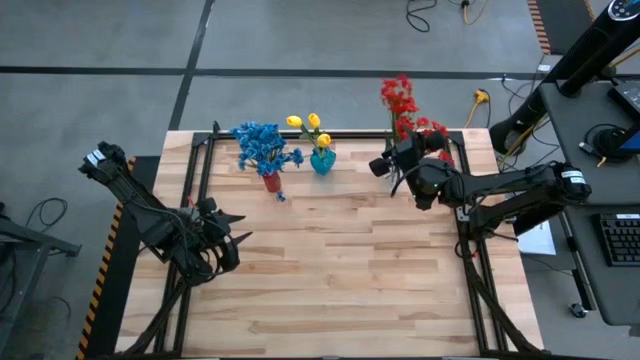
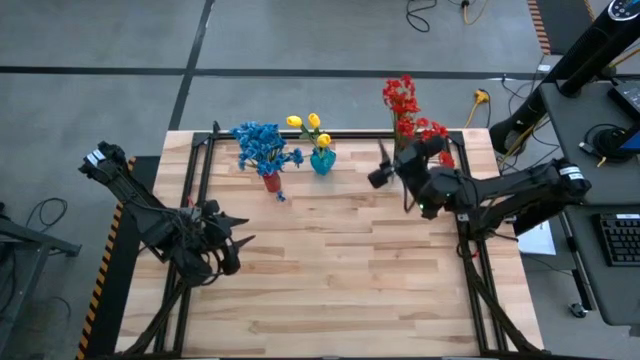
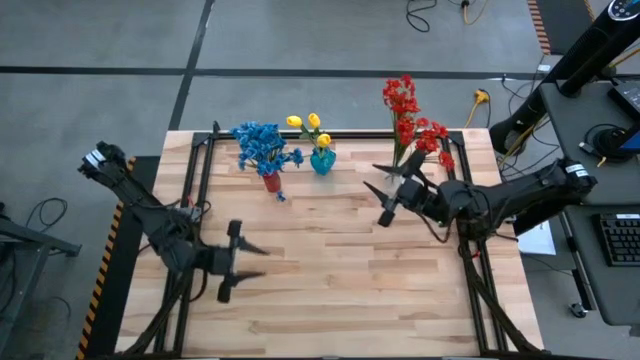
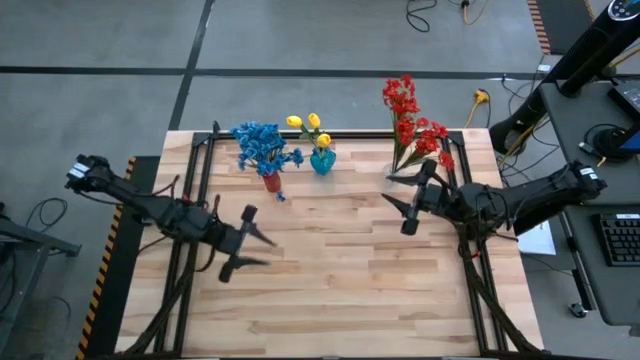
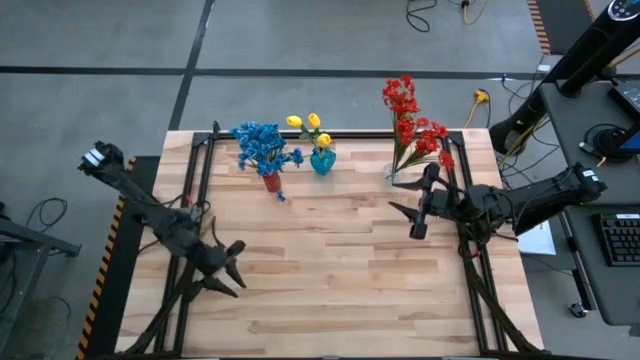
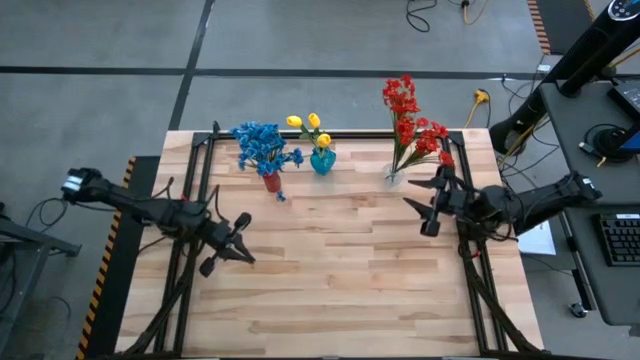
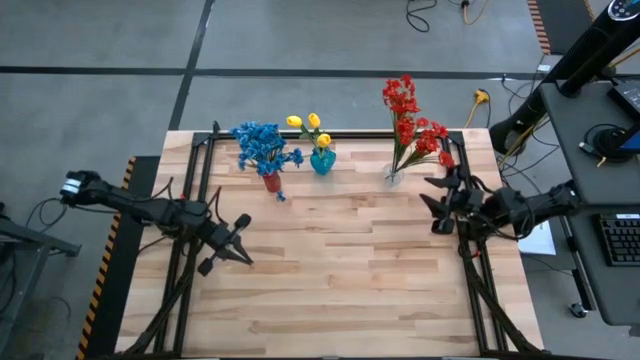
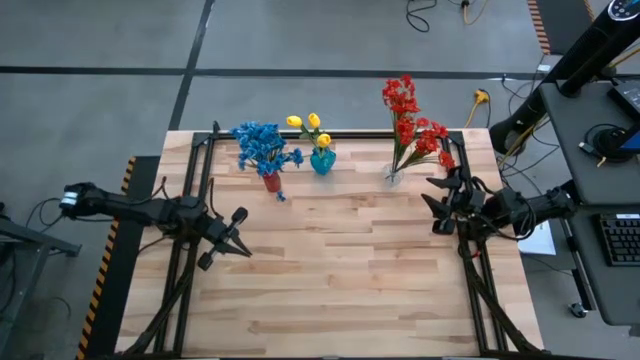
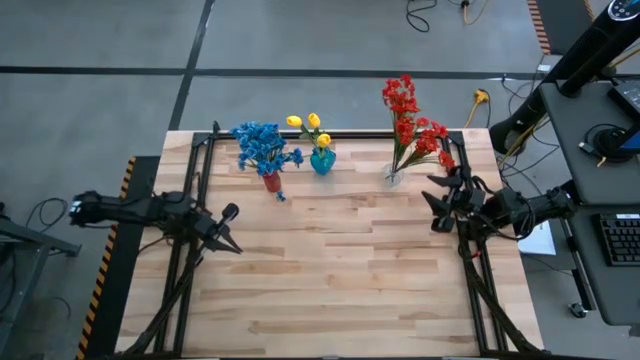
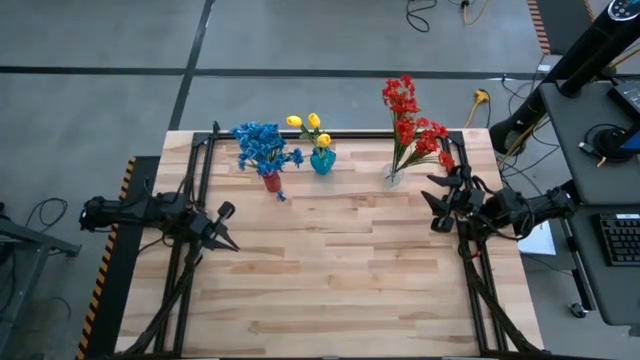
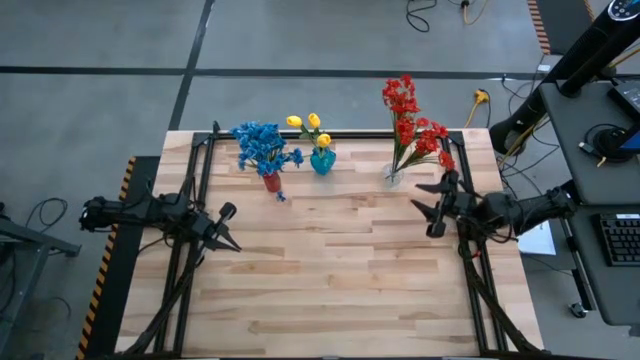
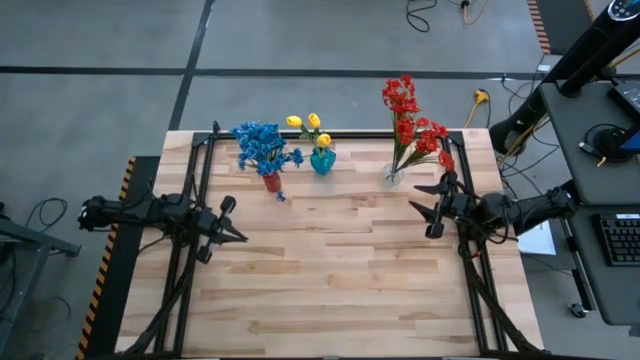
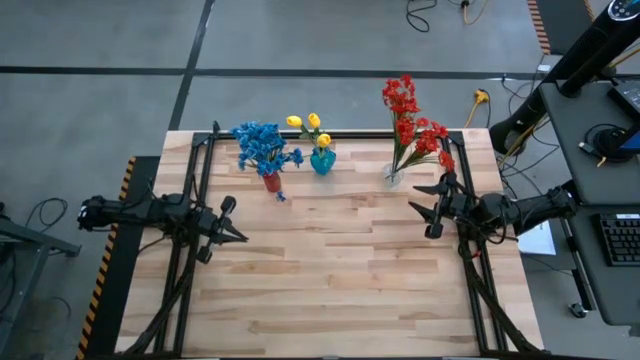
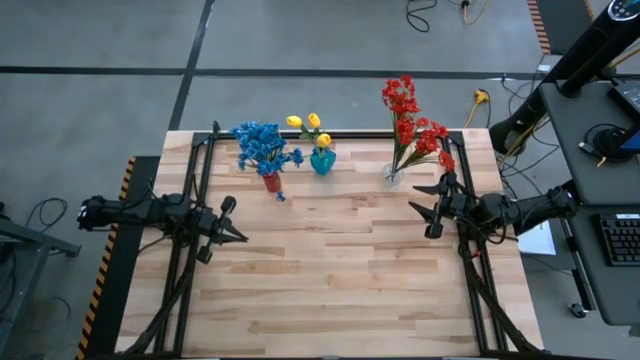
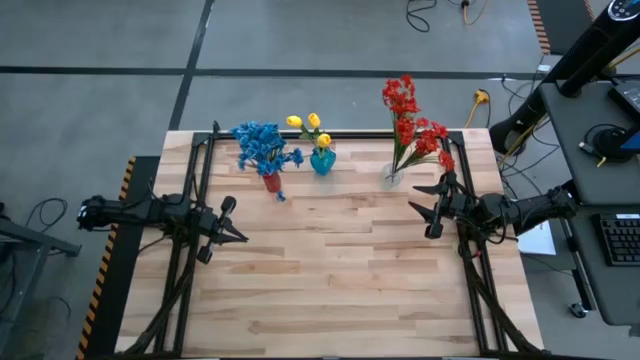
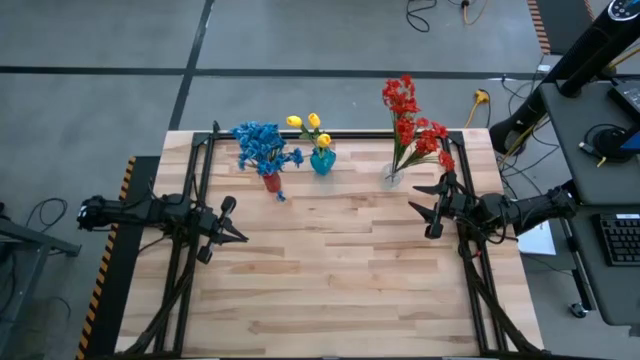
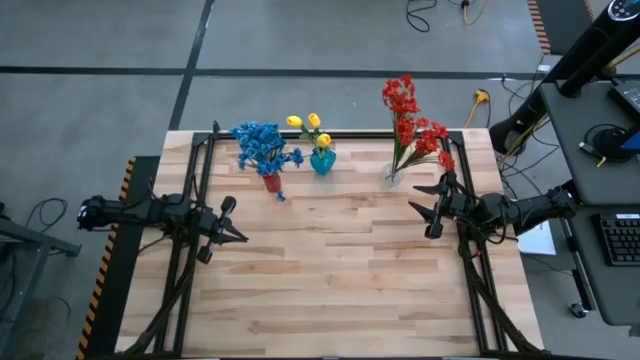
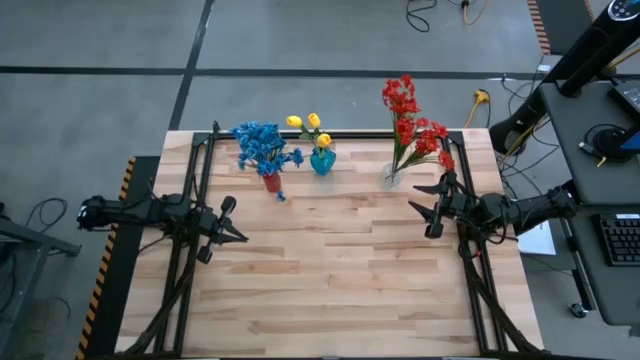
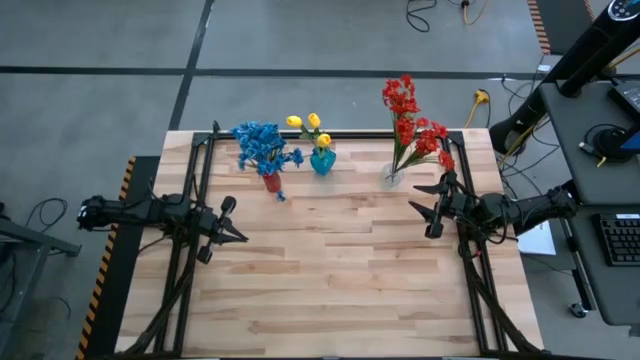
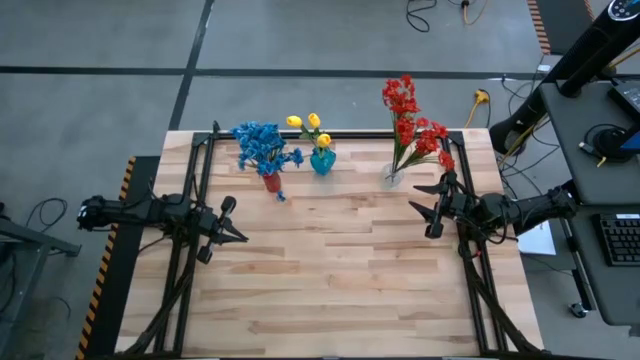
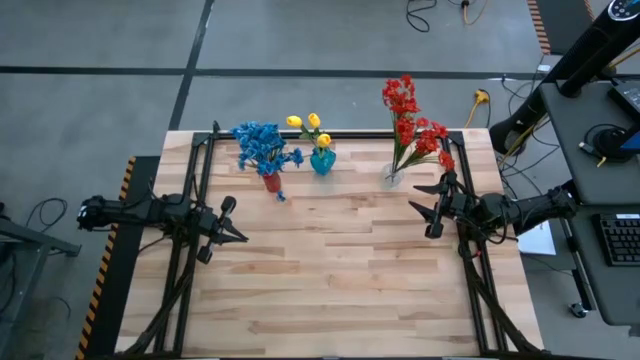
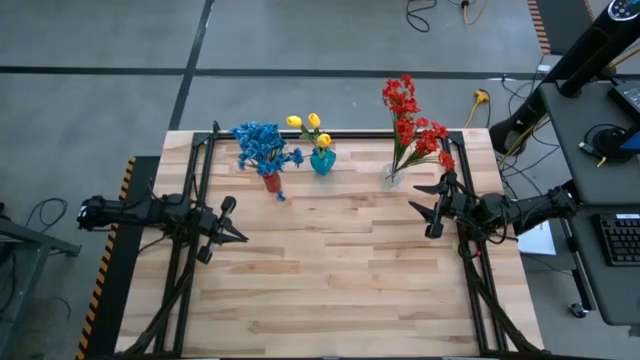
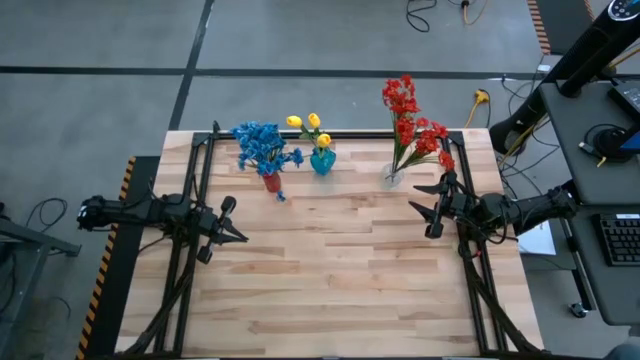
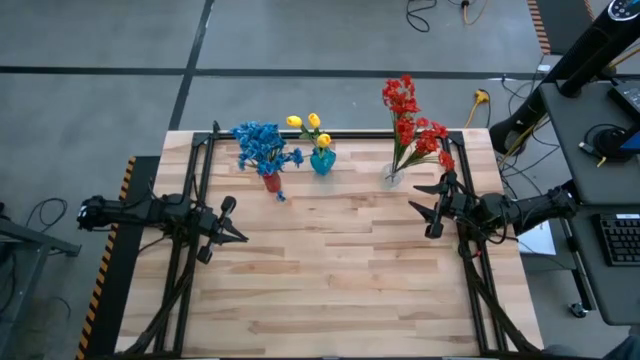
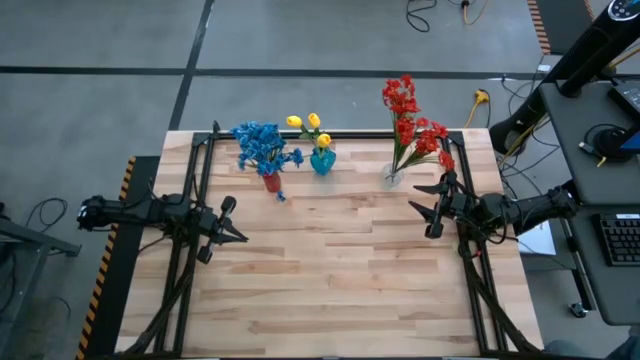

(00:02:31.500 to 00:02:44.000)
Task: Sort flowers into vase by color
Return to Home Position

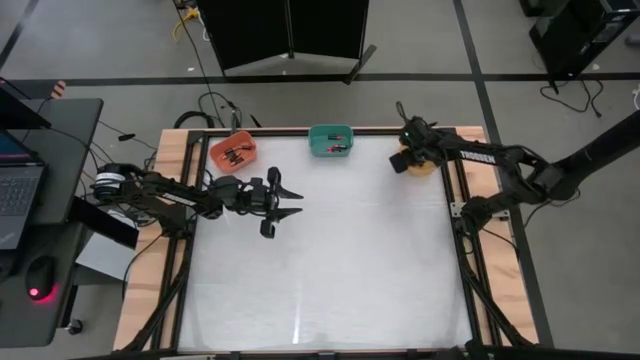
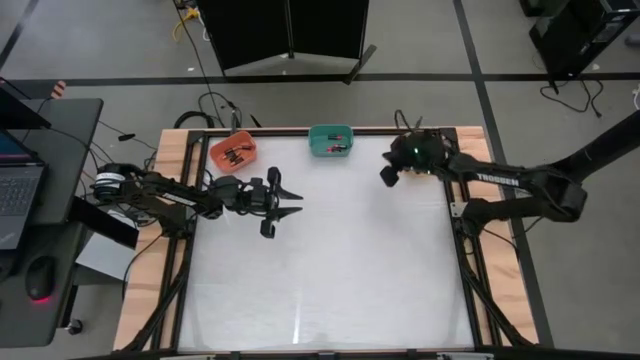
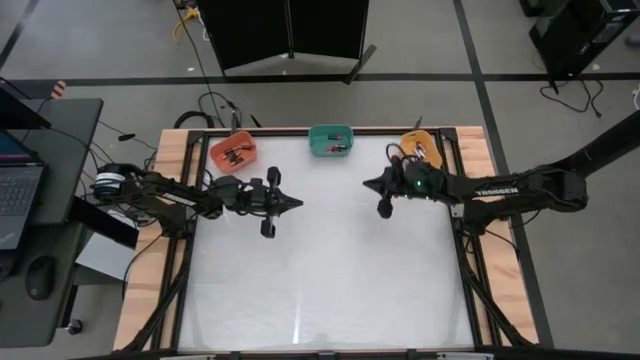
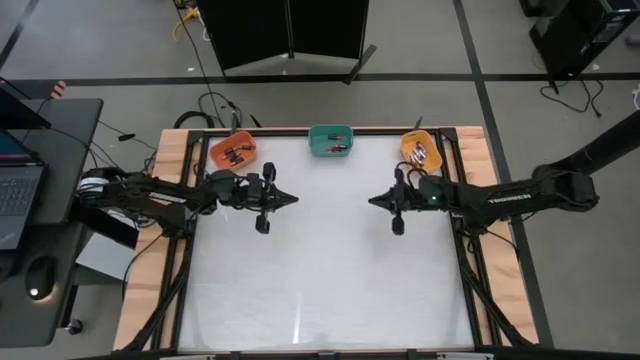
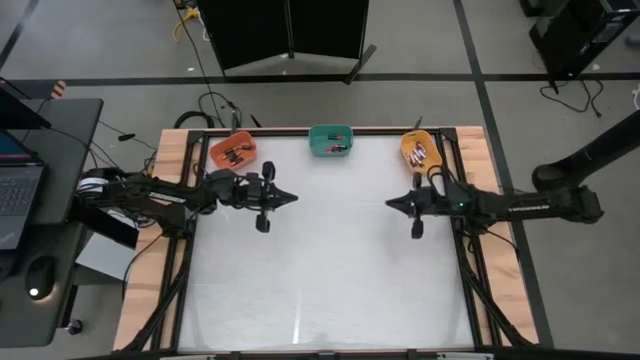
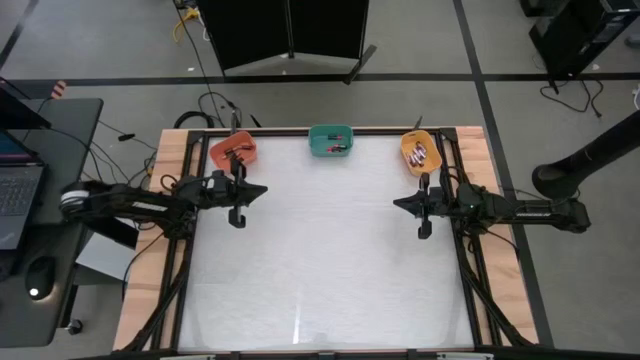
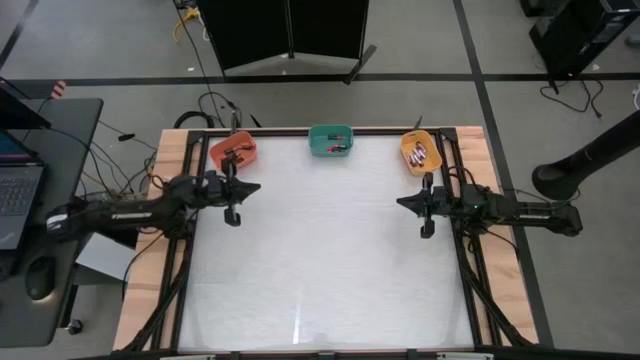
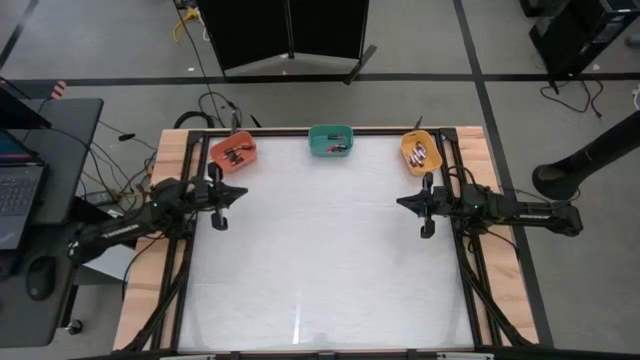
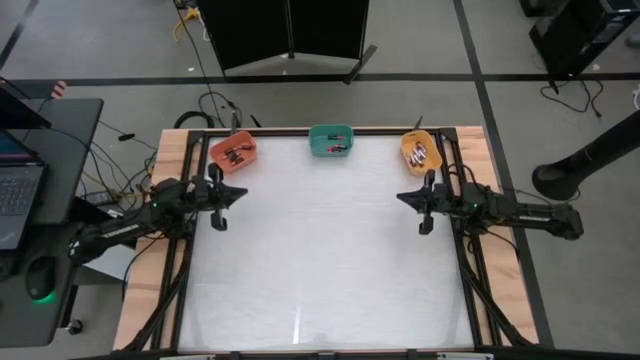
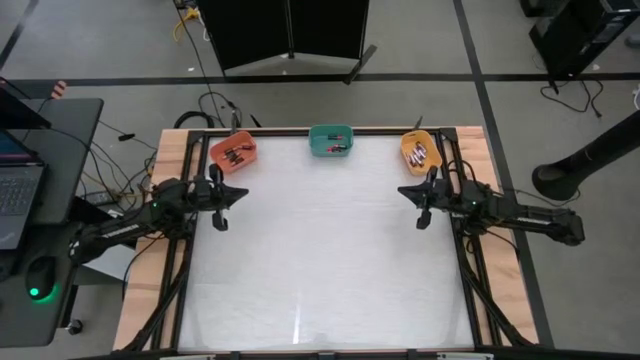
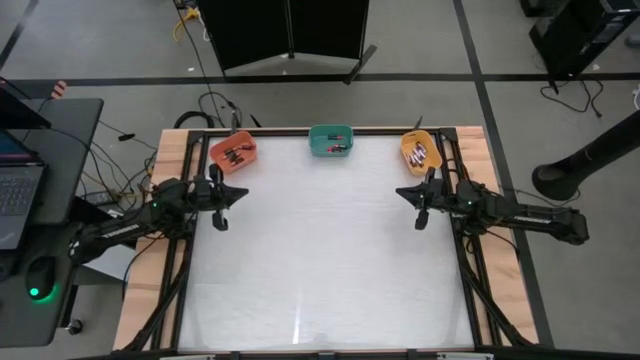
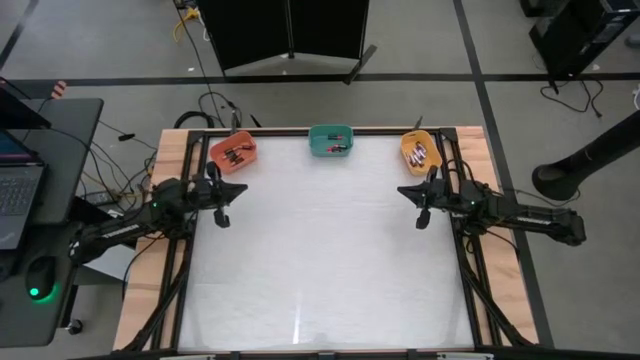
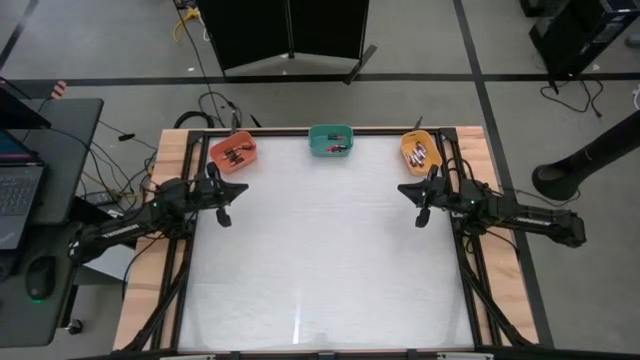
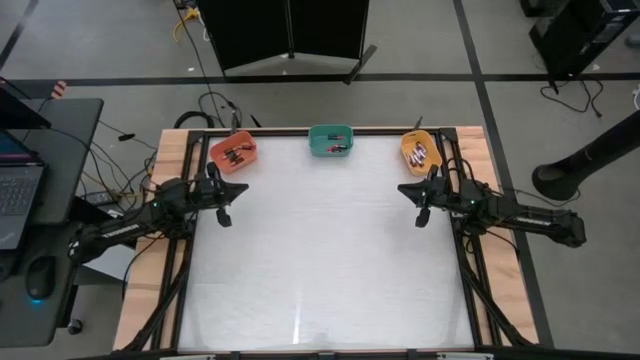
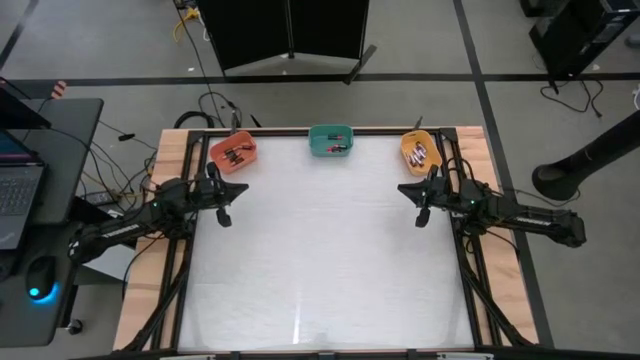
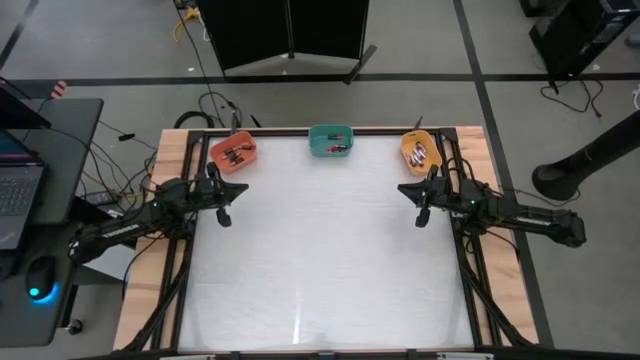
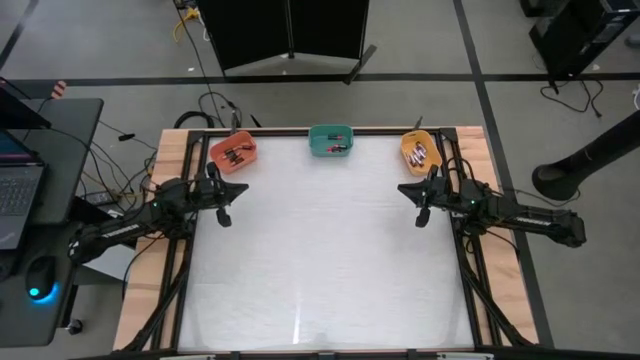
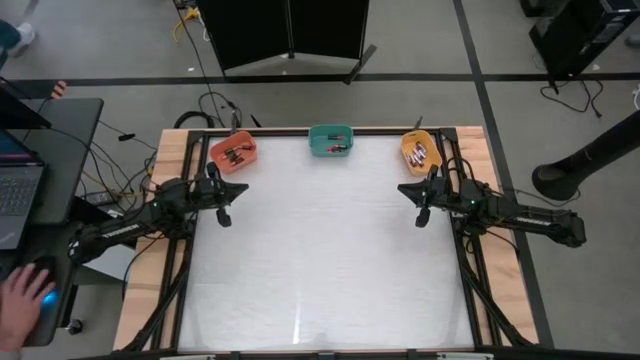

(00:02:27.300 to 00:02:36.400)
Task: Sort batteries
Return to Home Position
